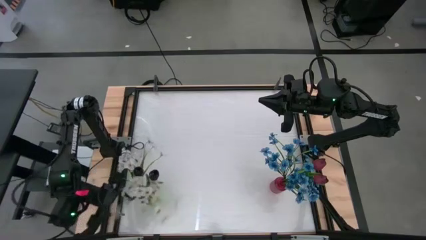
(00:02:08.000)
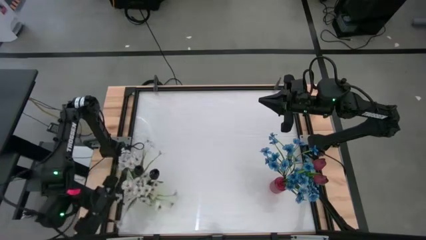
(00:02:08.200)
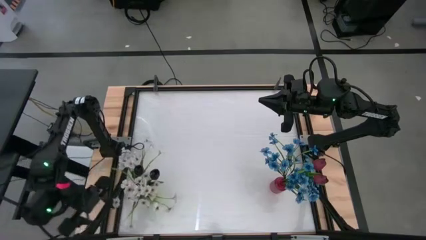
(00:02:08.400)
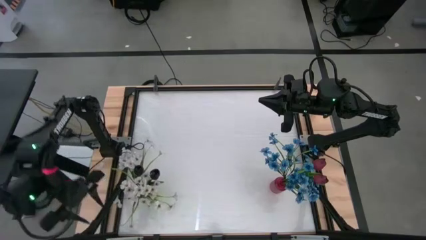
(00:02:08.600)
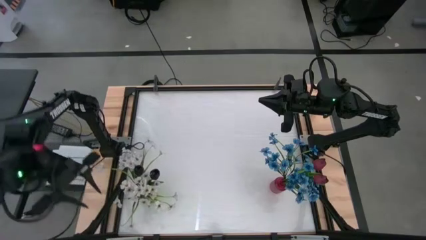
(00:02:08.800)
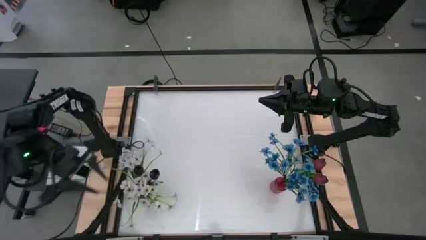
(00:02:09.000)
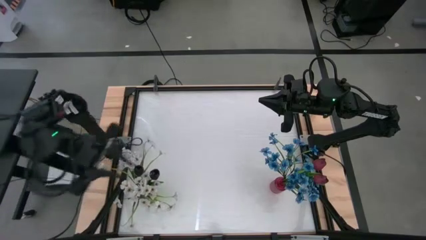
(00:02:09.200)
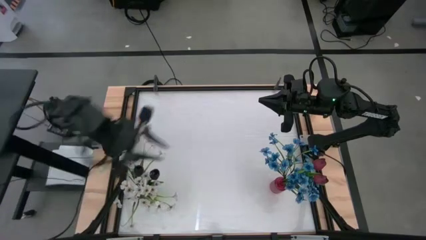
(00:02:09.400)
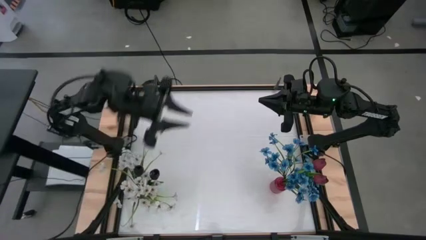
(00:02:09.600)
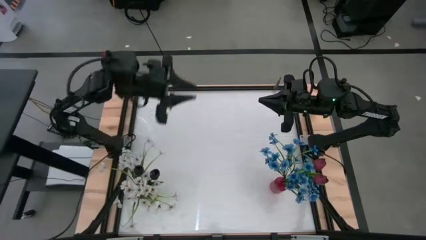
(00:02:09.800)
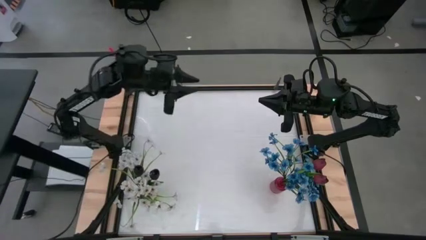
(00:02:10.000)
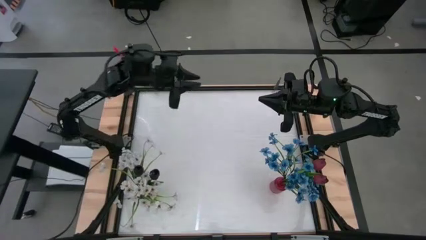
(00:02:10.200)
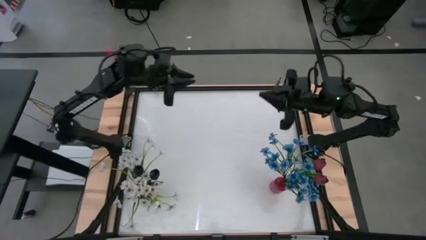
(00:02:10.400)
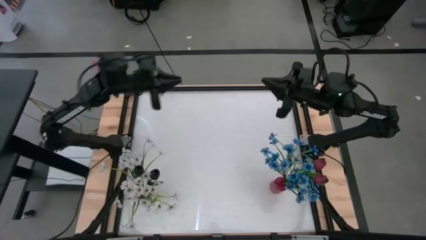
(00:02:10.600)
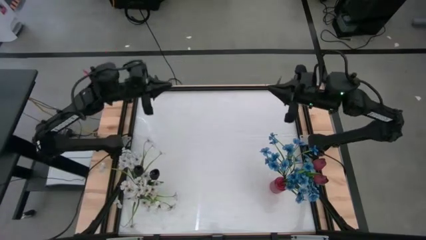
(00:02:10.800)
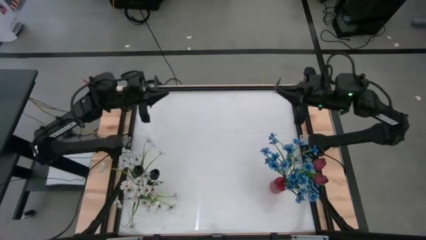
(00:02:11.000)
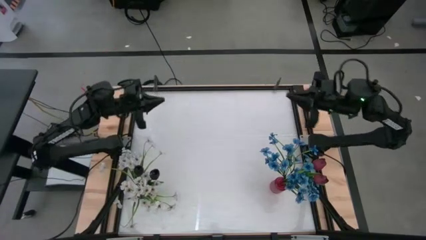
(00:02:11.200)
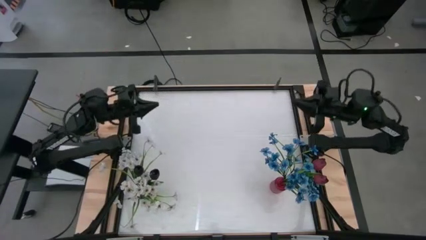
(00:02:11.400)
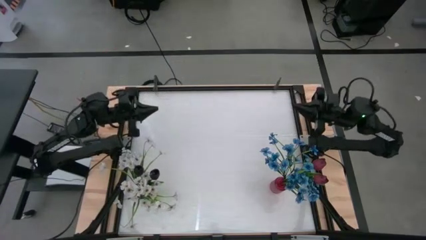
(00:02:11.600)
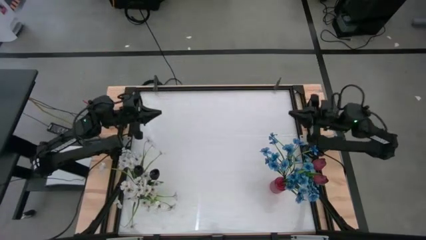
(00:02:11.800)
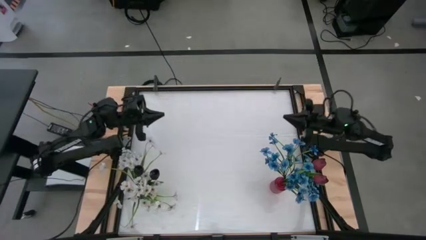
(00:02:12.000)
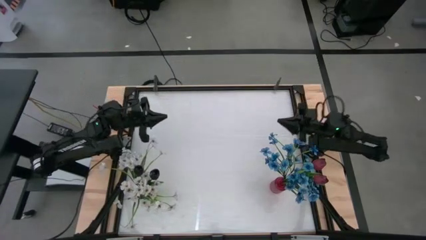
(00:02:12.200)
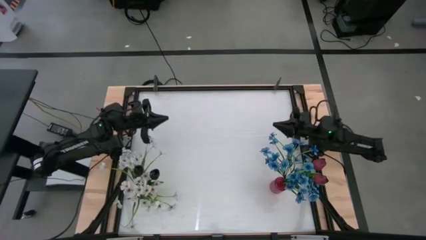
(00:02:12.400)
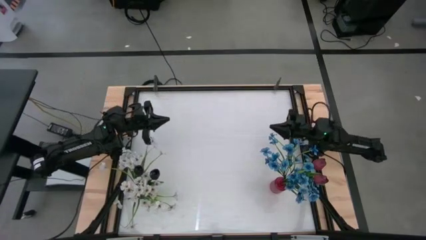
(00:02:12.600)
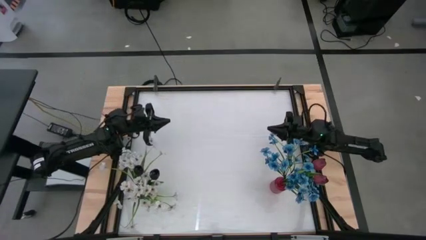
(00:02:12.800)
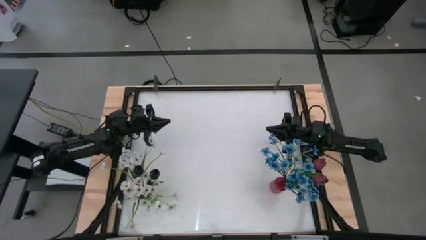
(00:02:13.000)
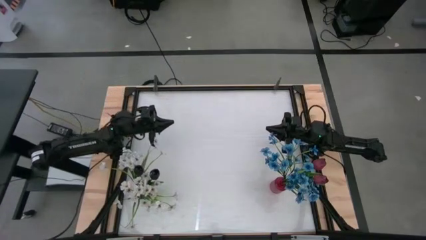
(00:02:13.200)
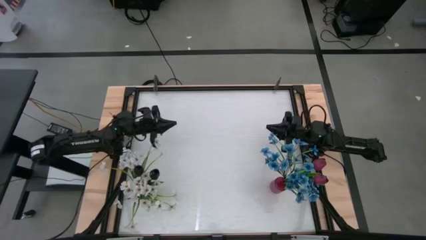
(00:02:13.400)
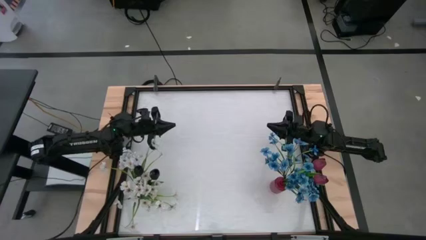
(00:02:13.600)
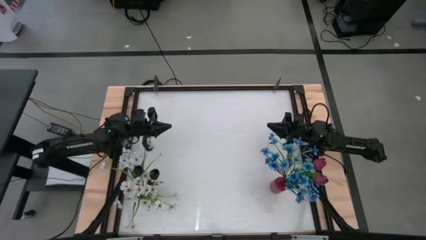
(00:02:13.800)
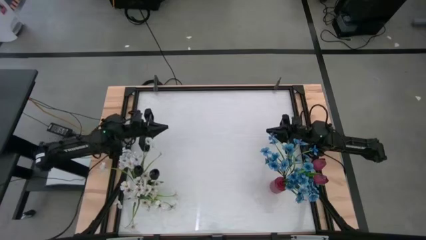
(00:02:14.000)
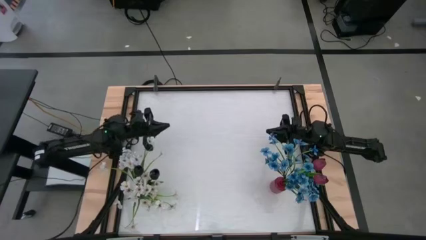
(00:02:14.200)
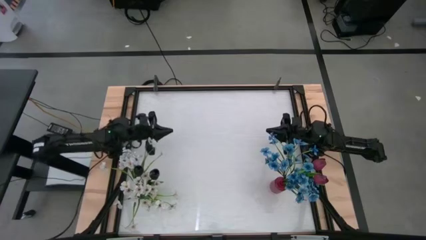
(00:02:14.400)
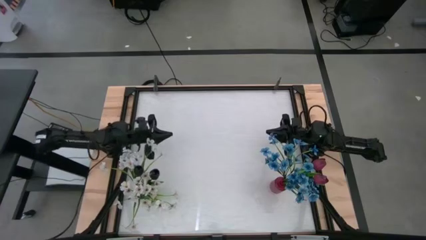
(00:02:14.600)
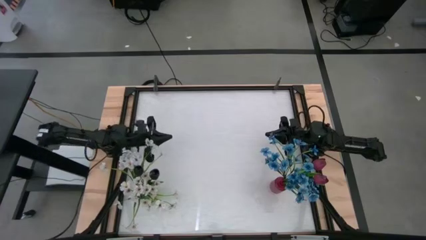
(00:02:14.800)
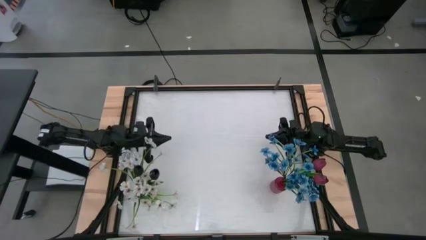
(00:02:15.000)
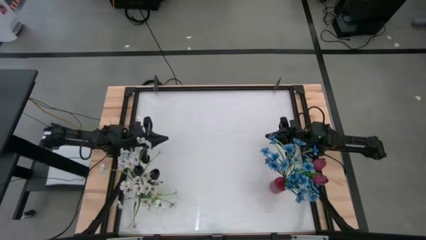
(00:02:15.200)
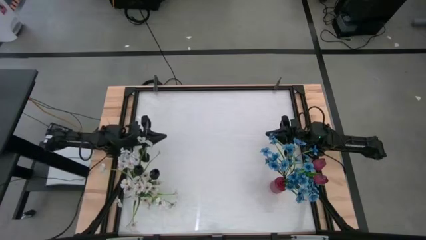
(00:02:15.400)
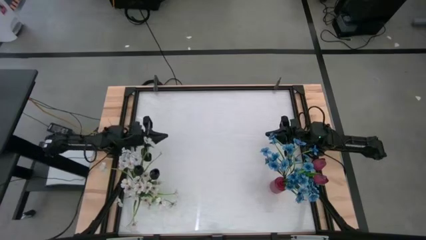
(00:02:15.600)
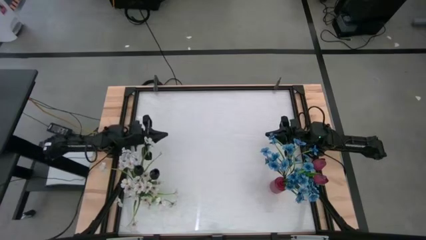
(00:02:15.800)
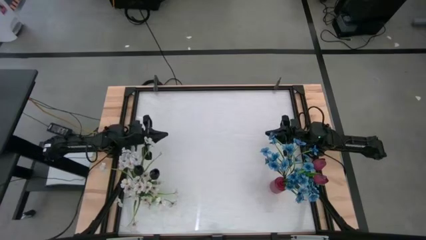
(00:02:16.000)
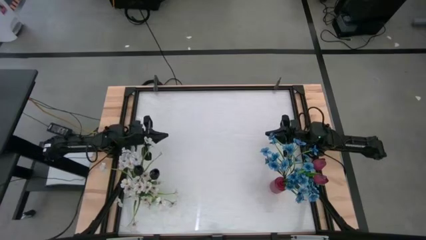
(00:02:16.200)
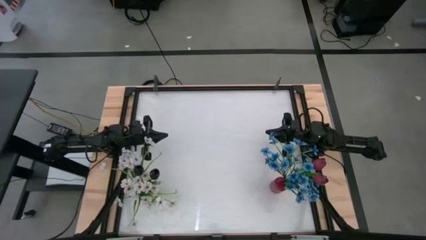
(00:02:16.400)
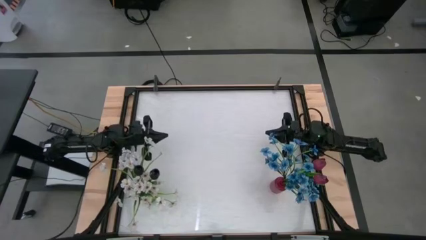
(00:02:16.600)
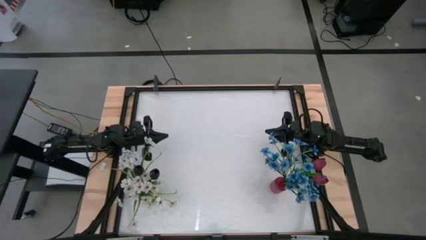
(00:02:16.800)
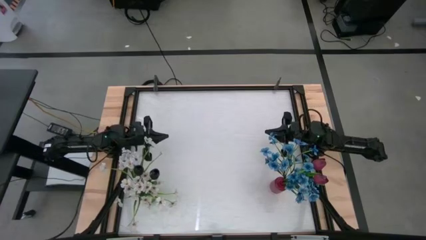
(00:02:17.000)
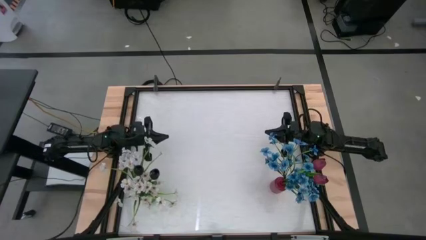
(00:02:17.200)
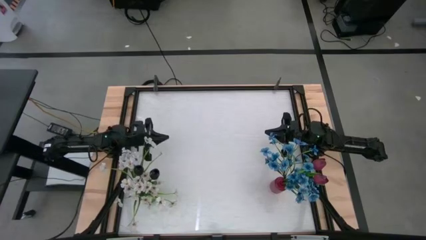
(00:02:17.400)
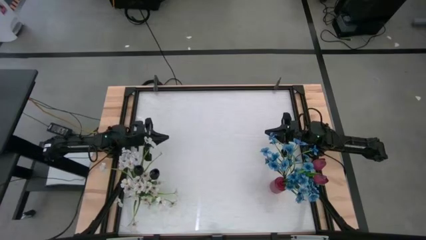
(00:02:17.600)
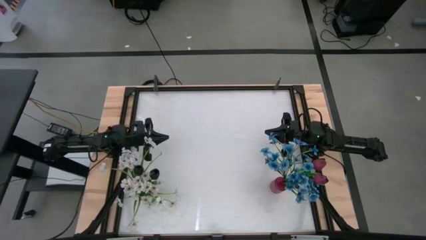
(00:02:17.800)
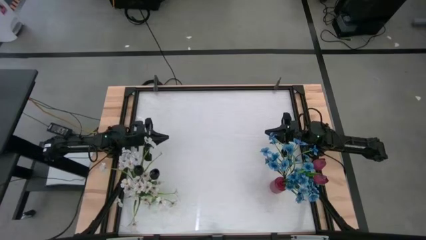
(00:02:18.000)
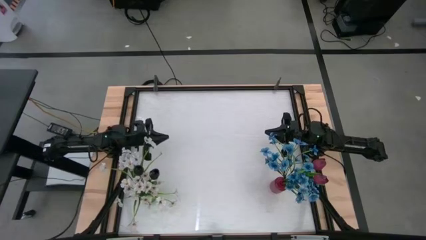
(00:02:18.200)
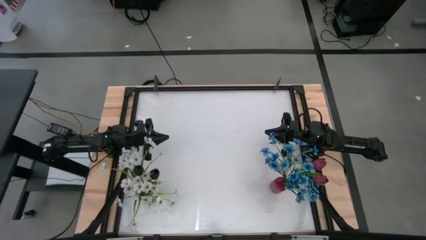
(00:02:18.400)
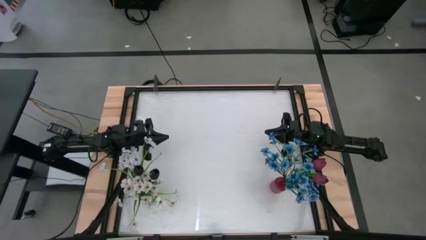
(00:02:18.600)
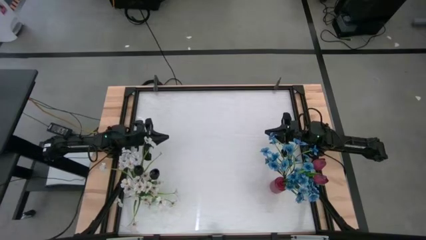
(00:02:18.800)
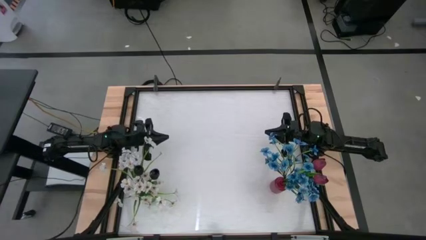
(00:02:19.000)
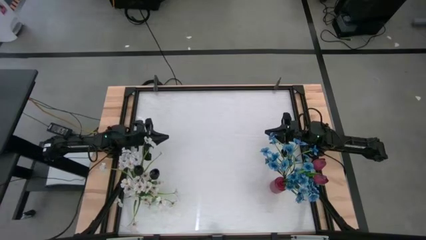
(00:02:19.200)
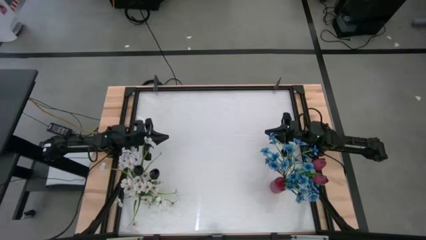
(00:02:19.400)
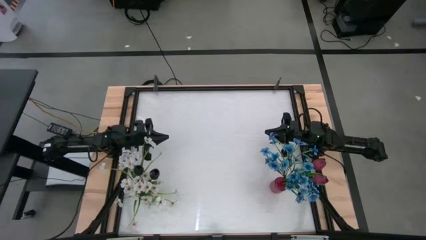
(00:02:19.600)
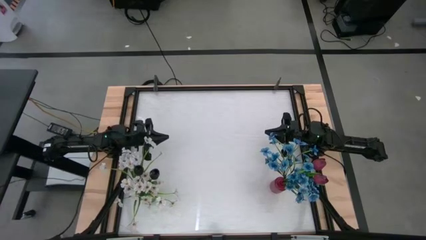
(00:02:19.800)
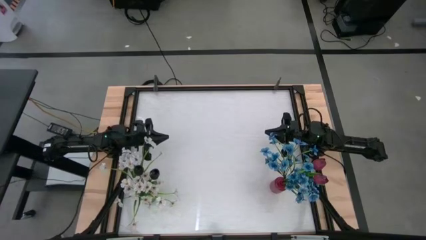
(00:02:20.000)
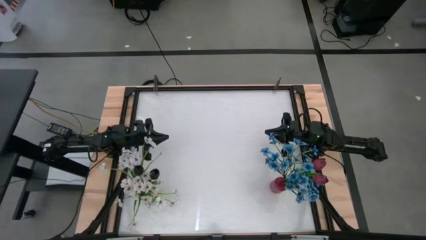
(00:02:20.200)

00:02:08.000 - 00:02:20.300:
Task: Sort flowers into vase by color
Return to Home Position

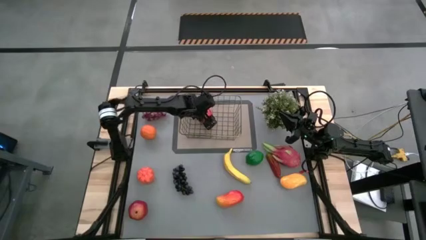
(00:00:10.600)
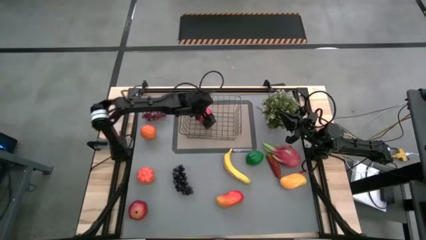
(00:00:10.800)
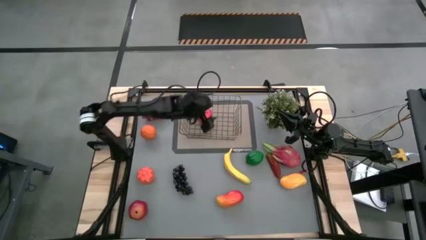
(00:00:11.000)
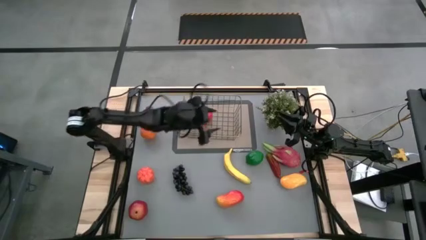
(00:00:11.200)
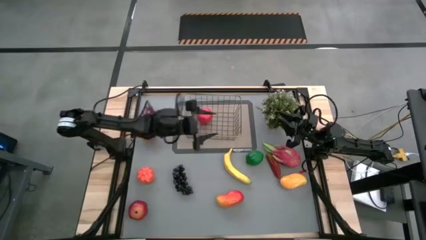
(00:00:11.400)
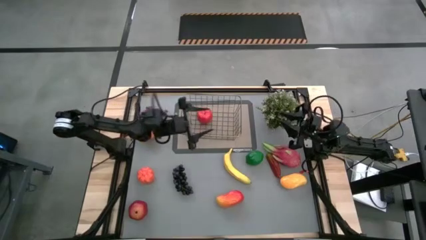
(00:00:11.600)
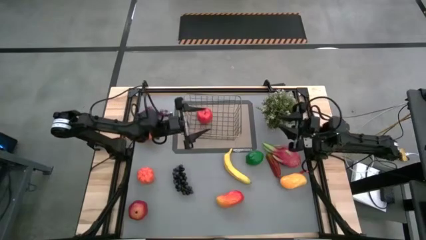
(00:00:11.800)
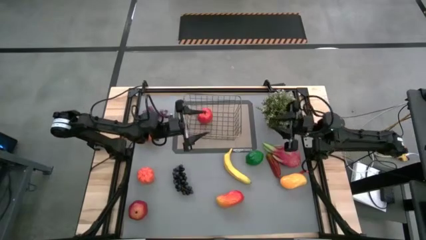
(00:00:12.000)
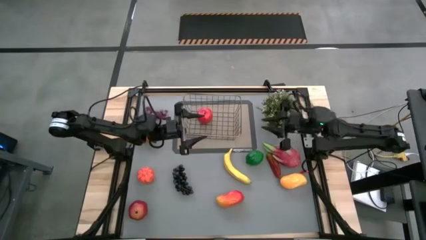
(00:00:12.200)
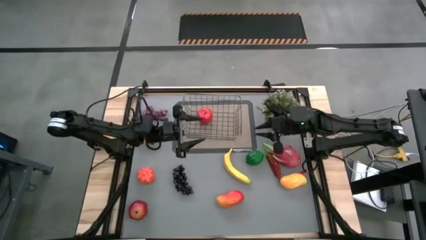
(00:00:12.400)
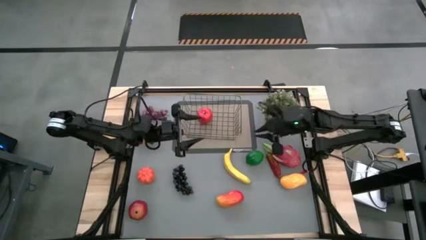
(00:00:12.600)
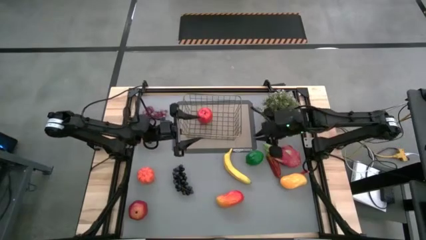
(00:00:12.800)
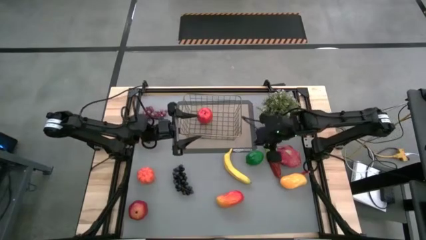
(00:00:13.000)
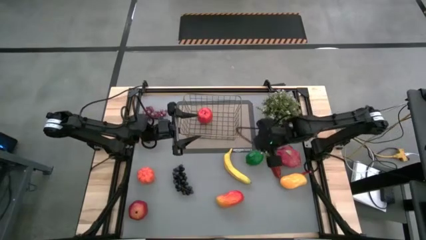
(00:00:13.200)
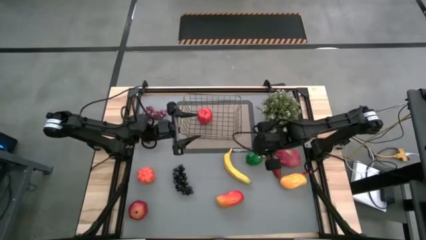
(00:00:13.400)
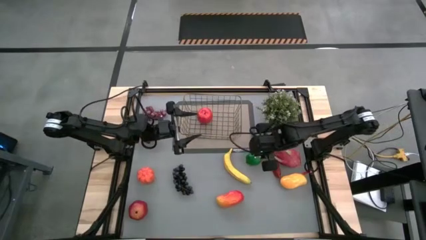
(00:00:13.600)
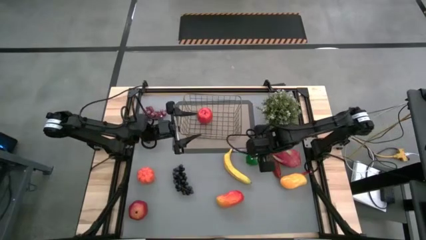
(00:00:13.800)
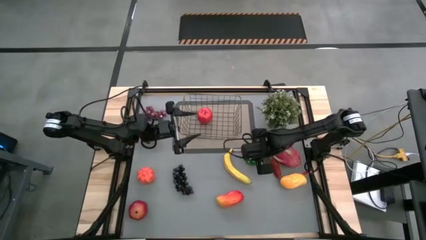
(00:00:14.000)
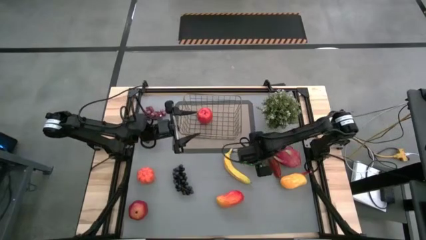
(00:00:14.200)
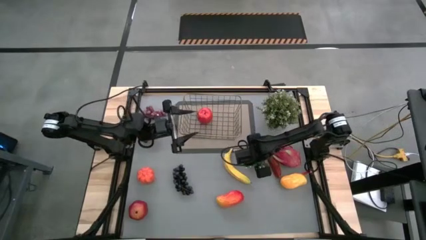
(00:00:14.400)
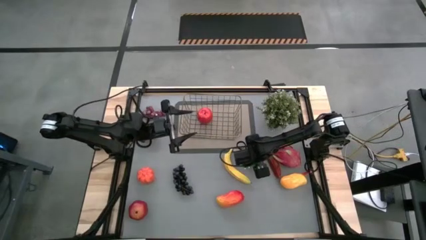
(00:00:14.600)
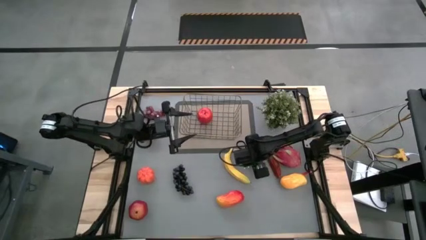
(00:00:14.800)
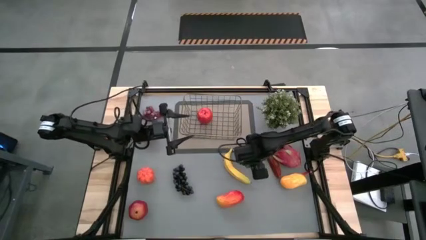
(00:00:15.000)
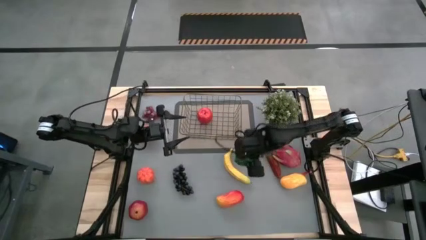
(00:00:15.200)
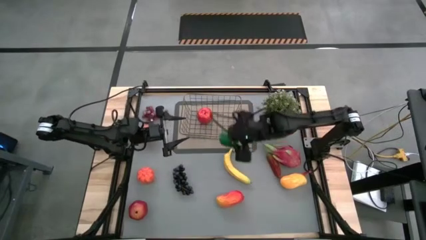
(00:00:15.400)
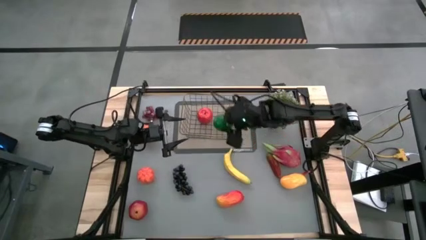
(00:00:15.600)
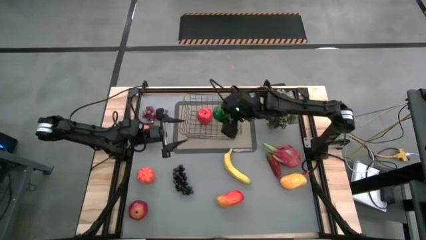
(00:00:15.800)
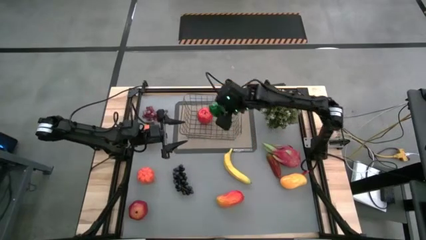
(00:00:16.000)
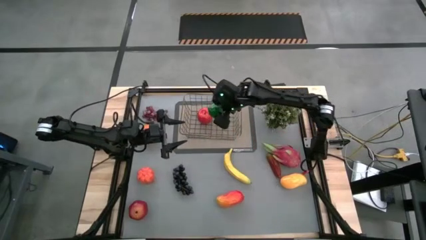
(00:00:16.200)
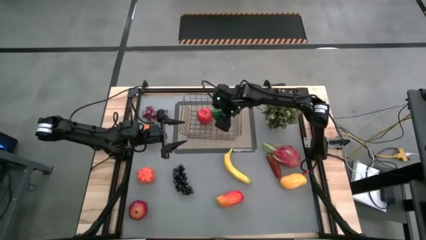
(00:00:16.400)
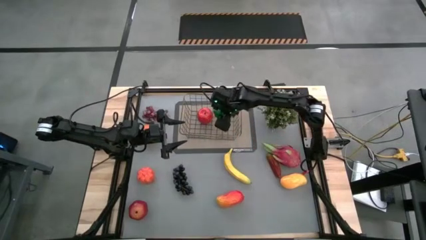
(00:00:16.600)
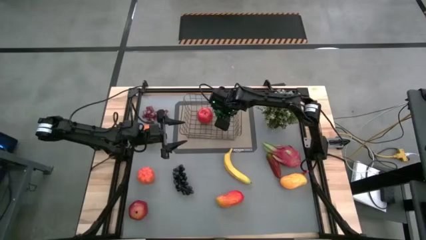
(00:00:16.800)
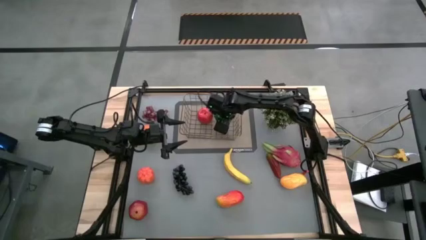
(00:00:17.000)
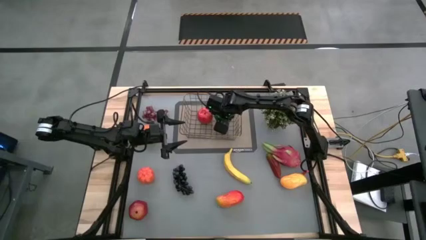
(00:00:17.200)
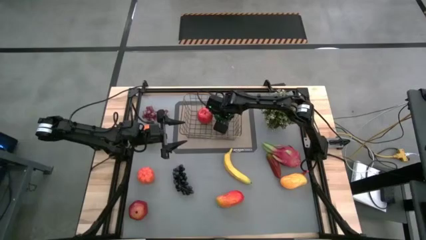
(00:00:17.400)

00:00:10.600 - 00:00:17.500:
Task: Build produce basket
Put the lime into the wire basket
